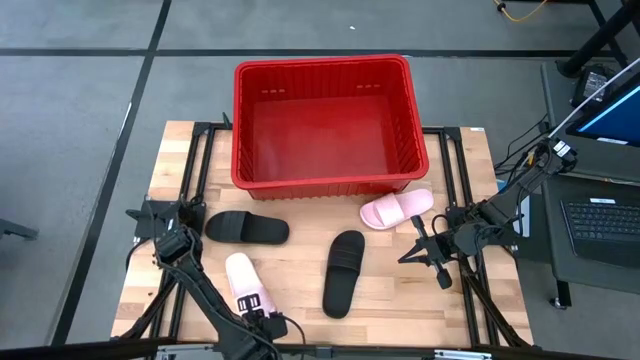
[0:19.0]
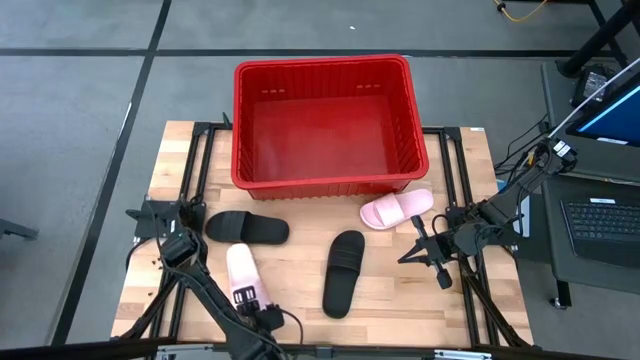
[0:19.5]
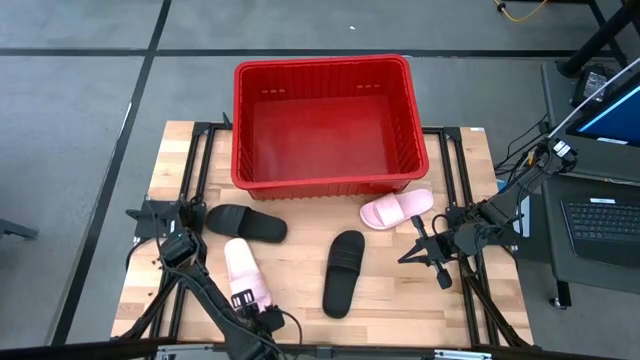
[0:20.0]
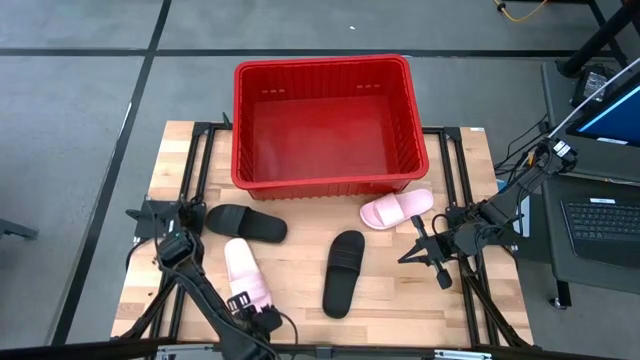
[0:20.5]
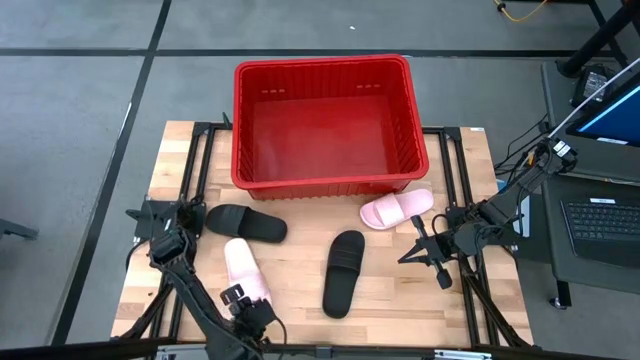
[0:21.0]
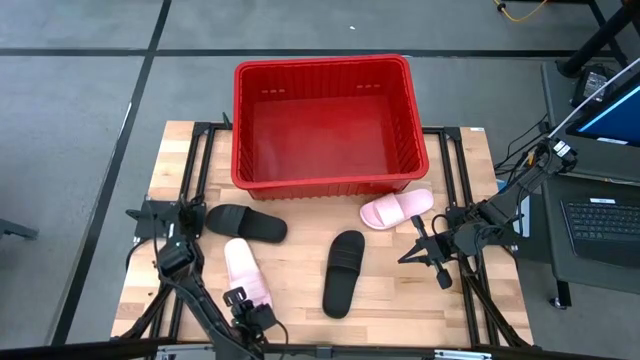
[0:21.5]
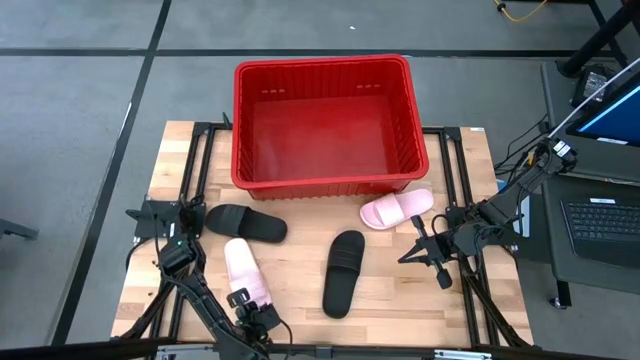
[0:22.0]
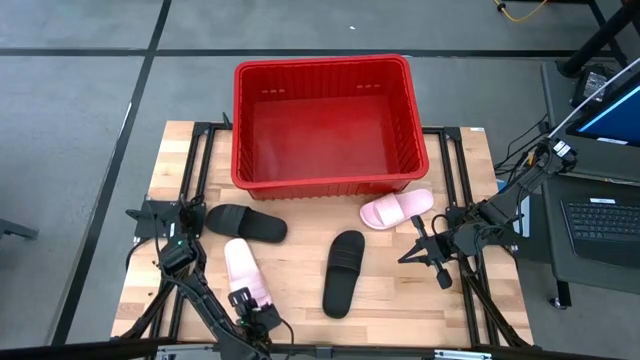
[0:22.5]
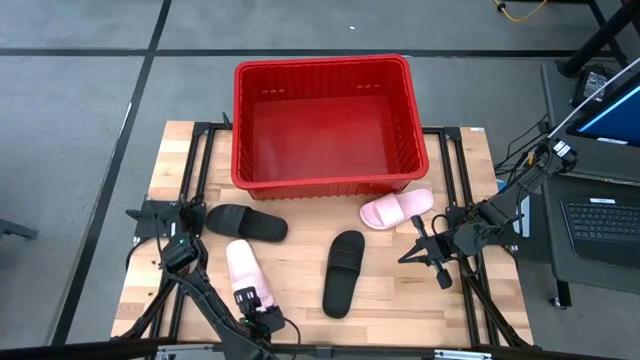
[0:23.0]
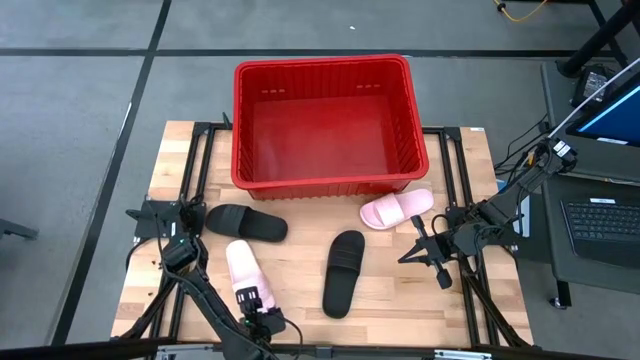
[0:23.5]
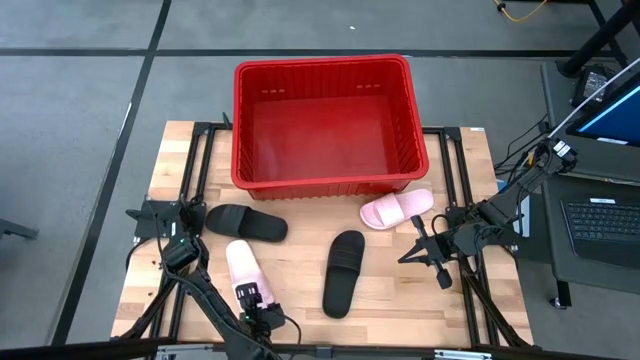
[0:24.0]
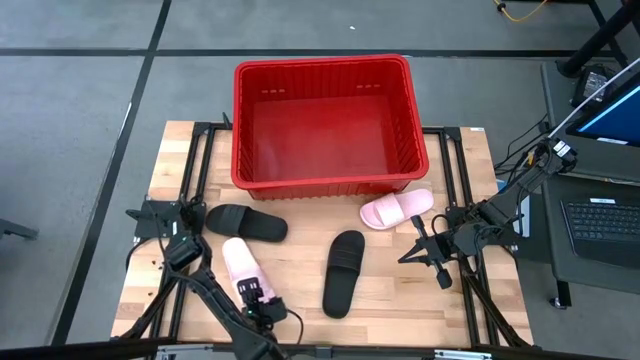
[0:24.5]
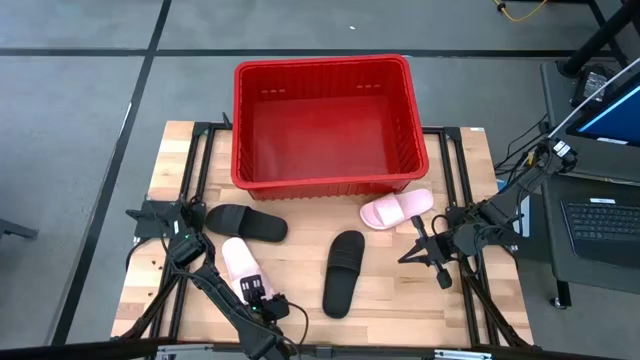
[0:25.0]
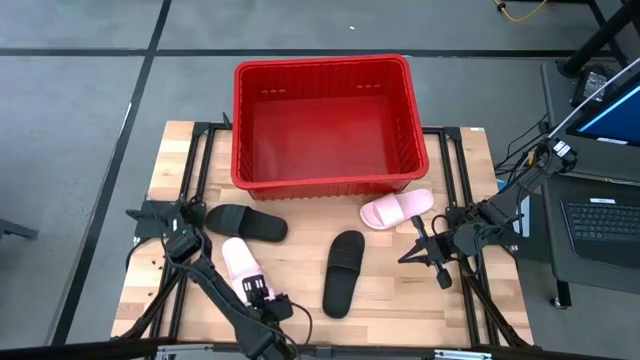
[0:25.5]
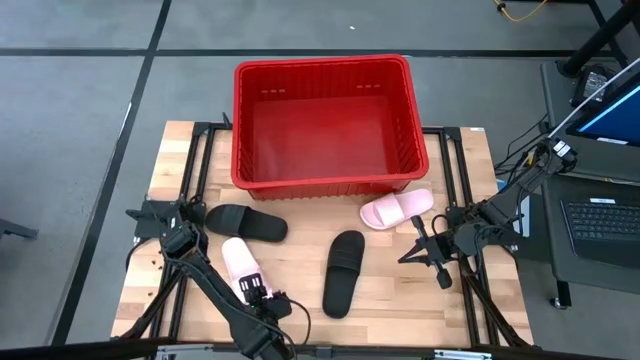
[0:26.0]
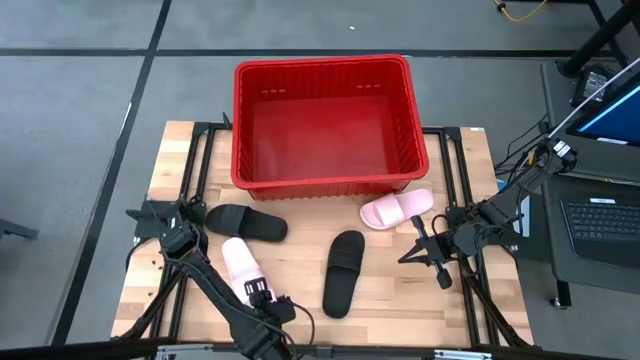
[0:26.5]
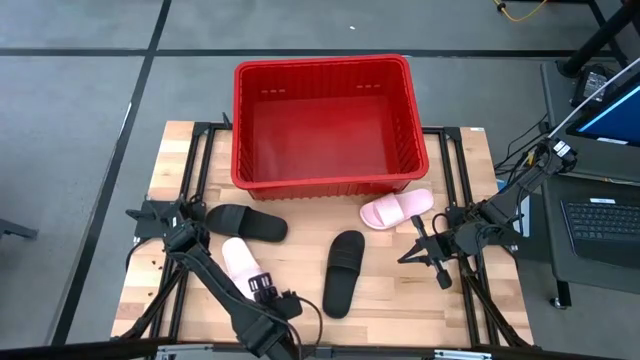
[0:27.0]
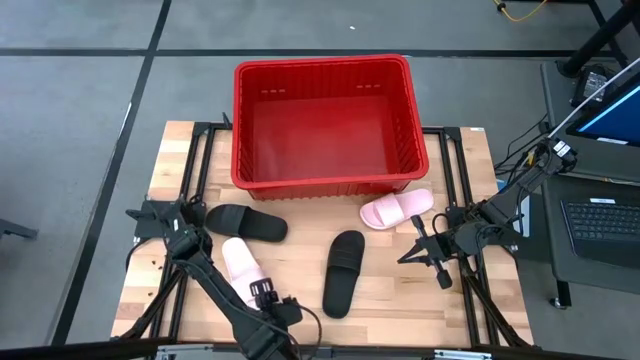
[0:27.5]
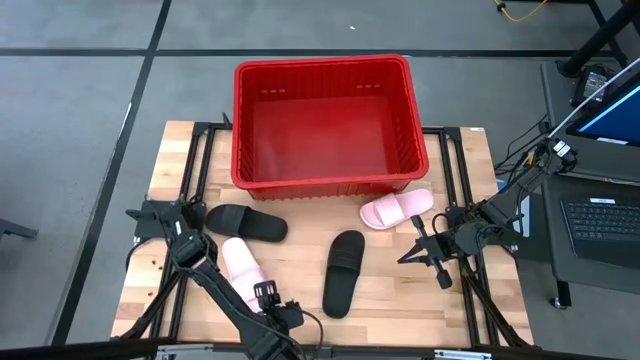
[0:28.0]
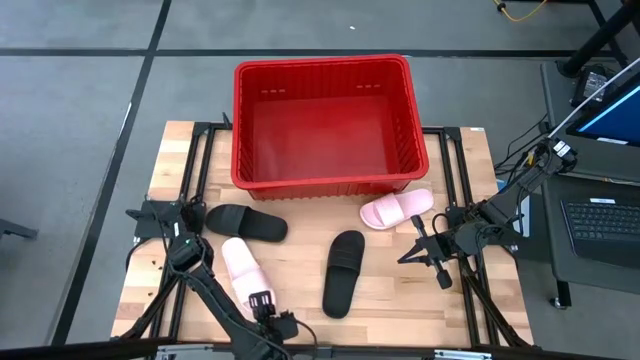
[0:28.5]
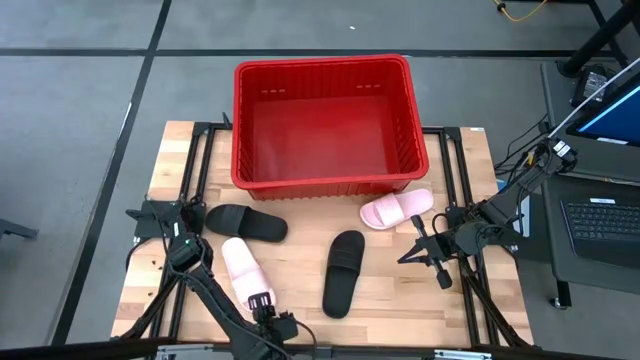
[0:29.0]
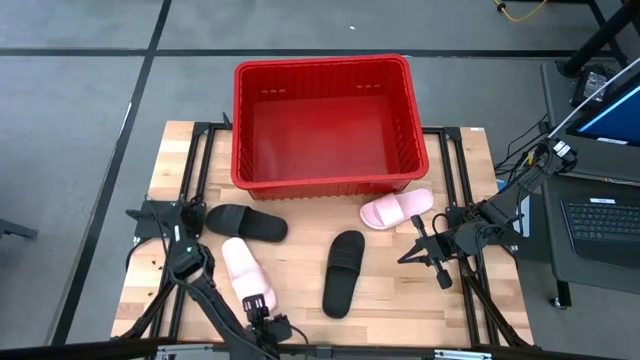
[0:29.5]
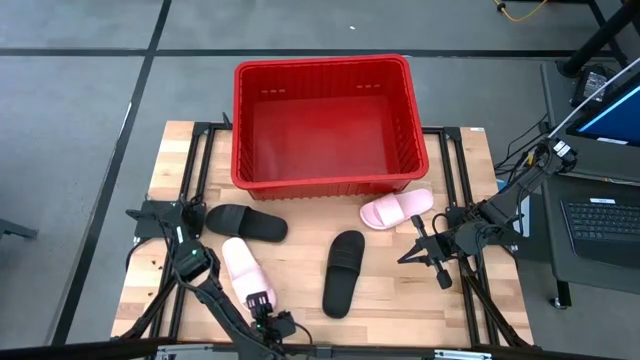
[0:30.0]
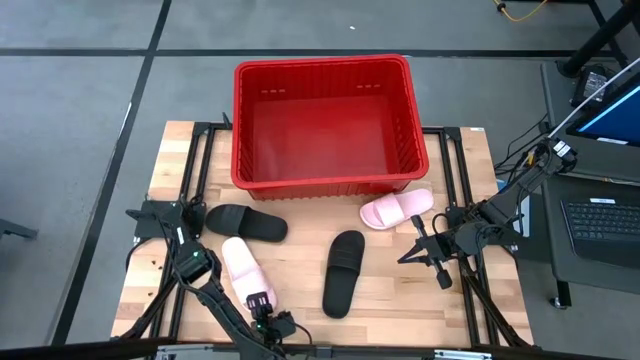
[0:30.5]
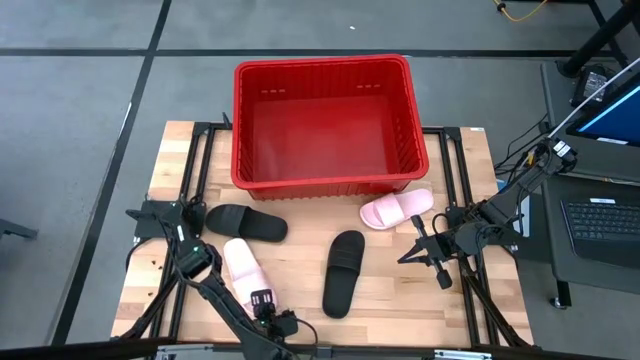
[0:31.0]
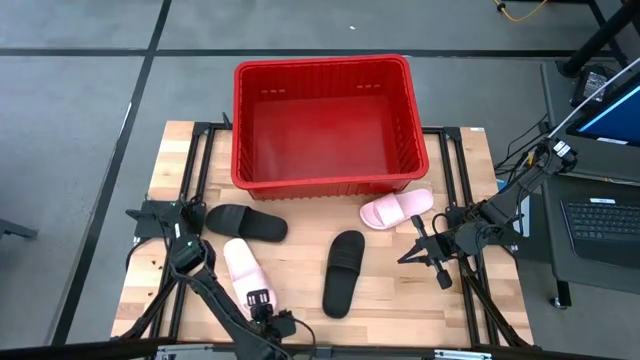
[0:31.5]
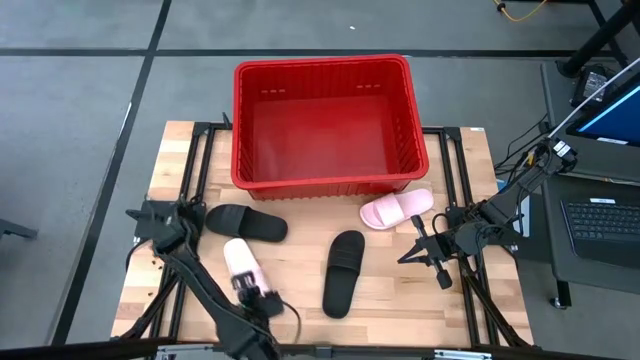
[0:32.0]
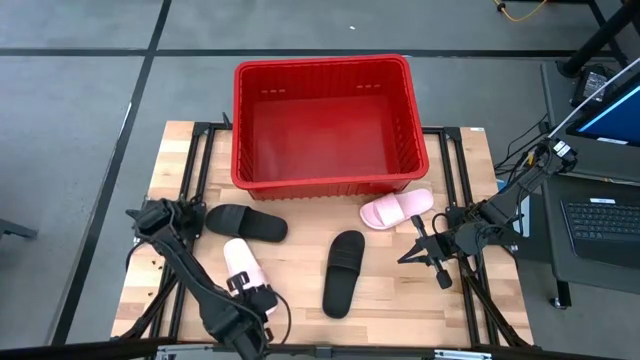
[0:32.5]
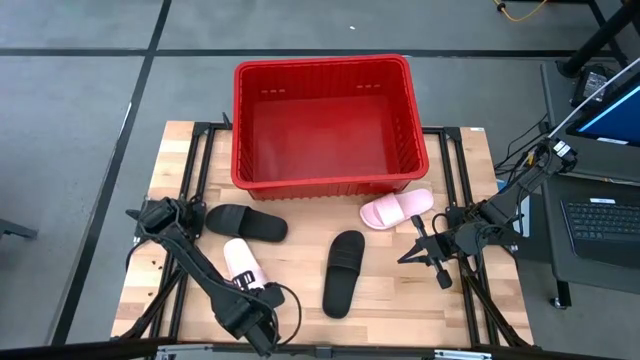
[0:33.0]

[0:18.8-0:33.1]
Task: Pick and place slides into bin
Put the top pink slide into the red bin

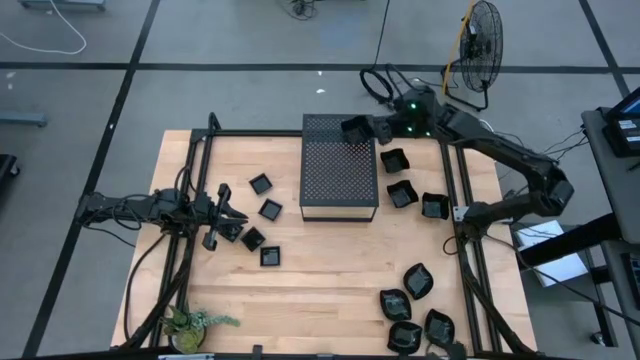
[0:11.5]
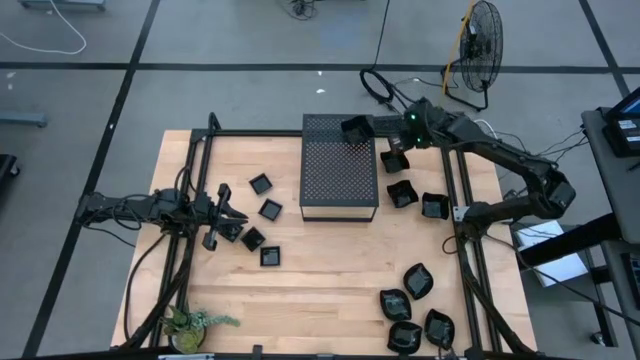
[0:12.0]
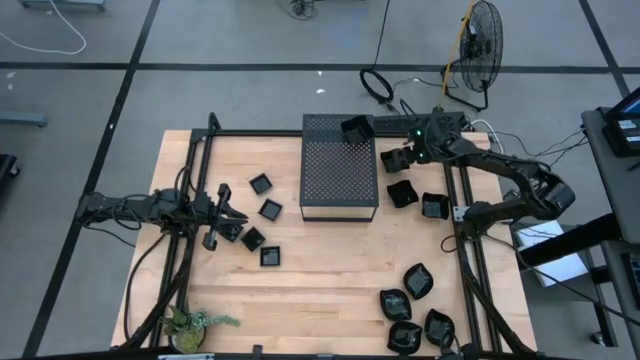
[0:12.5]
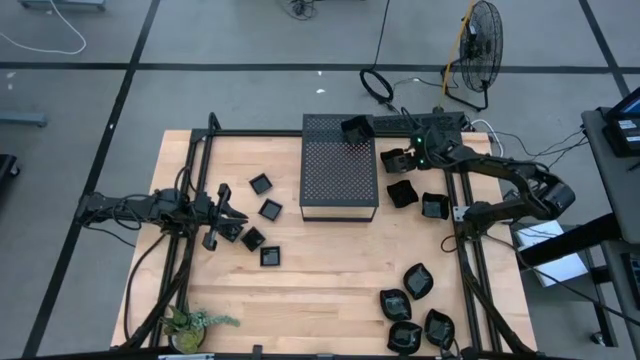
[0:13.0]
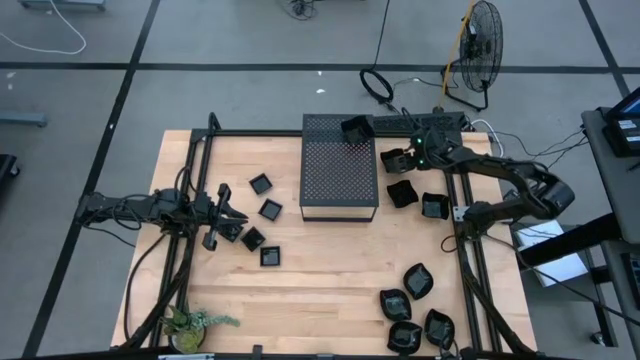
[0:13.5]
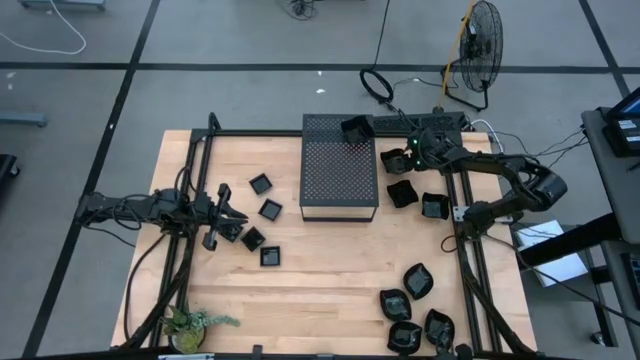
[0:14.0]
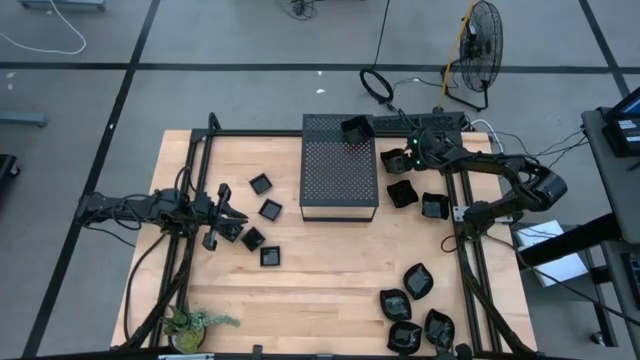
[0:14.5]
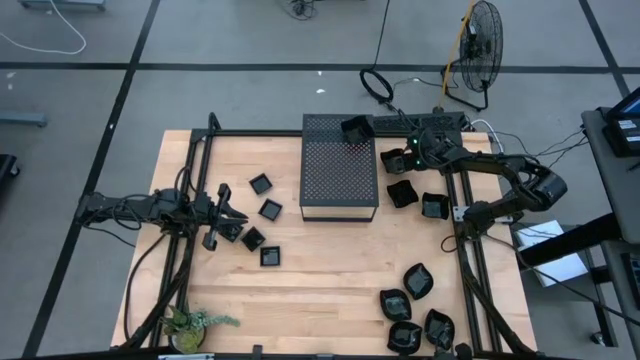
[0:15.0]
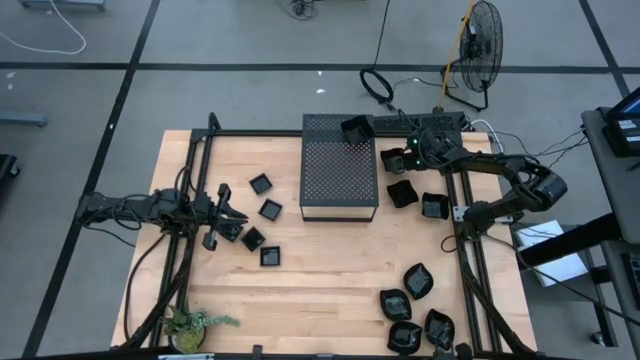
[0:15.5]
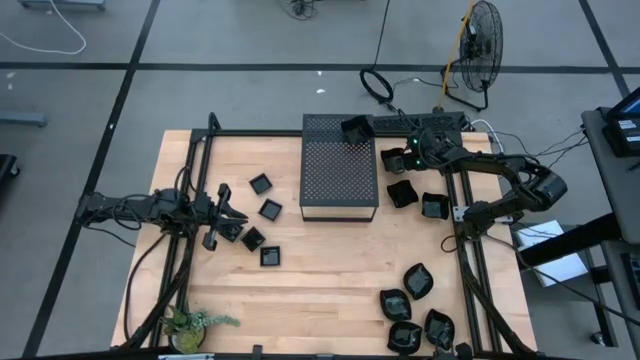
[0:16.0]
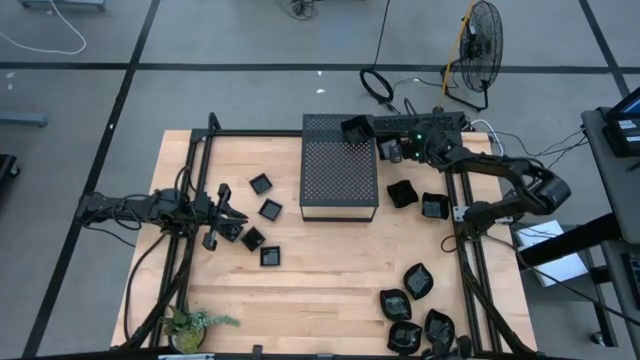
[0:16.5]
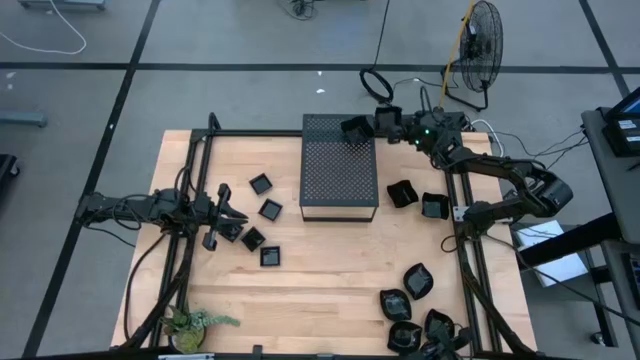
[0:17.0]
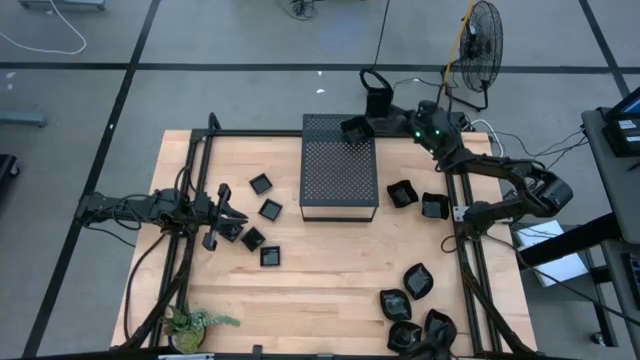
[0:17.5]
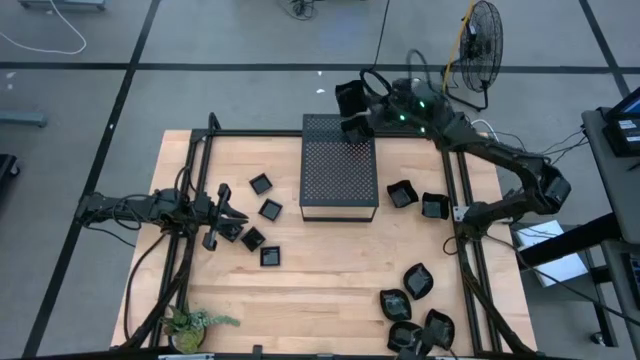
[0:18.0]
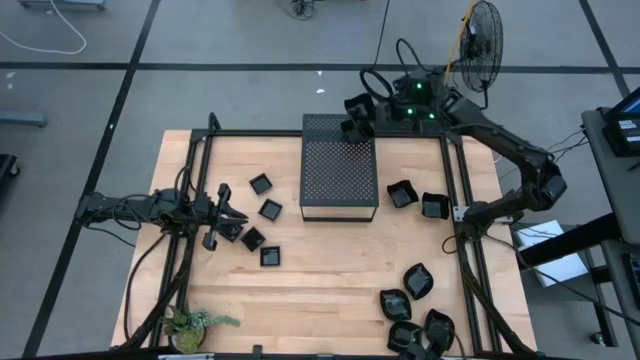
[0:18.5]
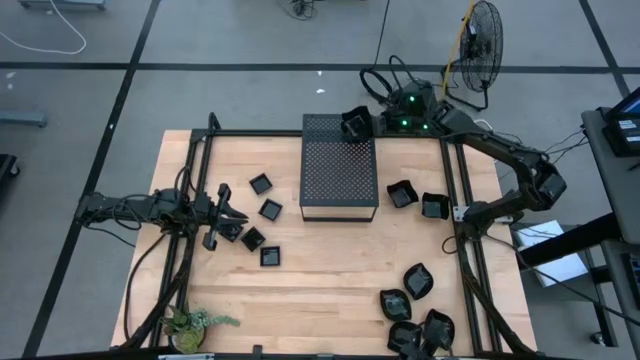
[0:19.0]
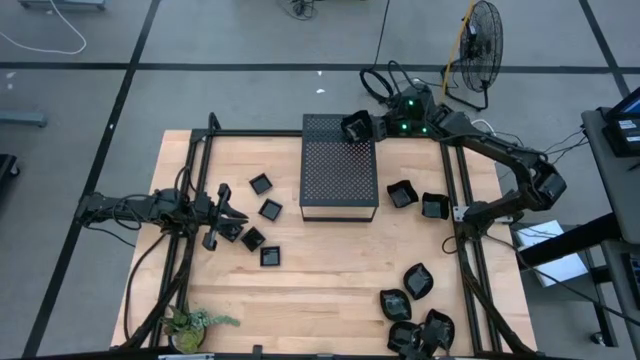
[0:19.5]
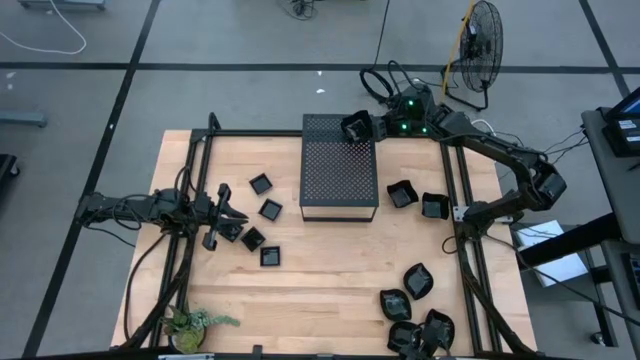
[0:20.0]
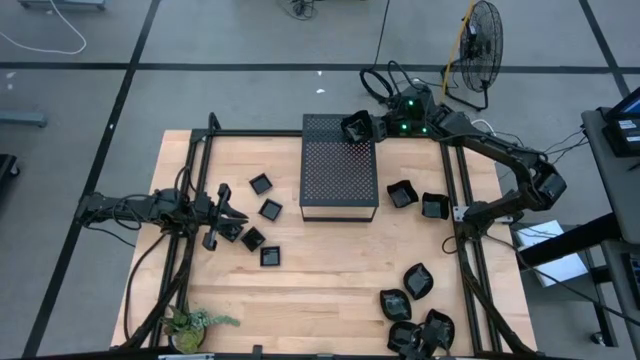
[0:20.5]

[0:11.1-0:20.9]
Task: Pick & Place Mini shaped plates
Stack the distorted square plate on top of the distorted square plate on the shelf
